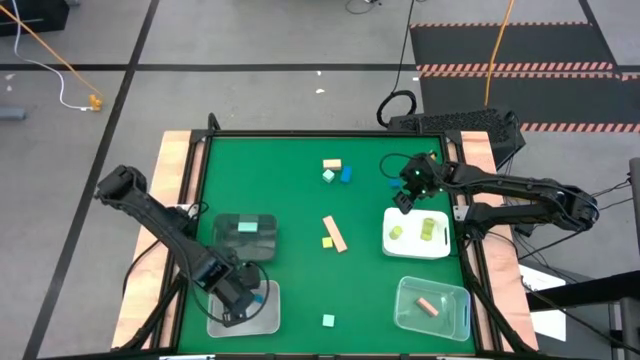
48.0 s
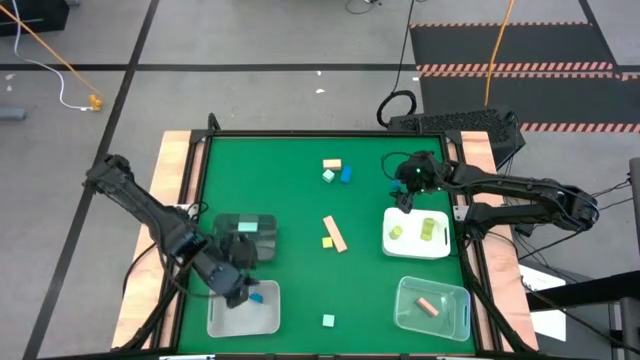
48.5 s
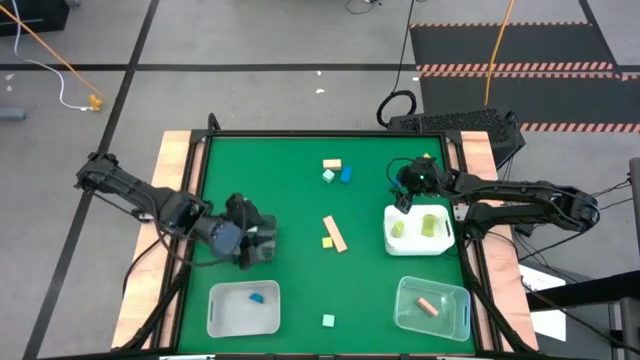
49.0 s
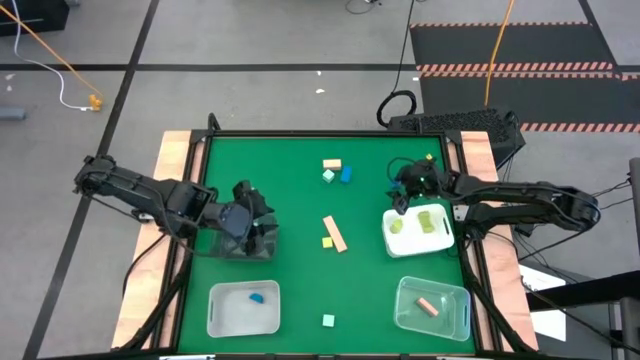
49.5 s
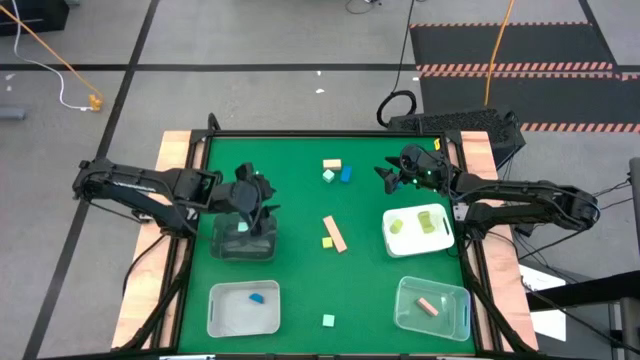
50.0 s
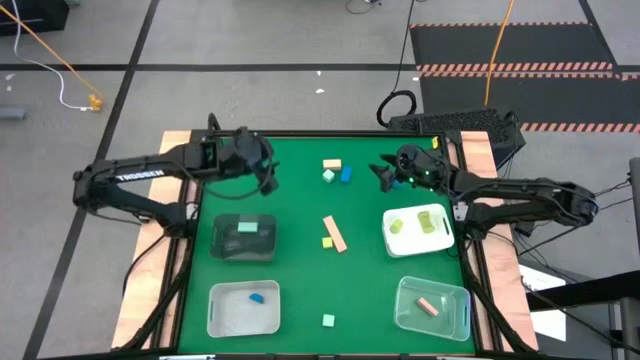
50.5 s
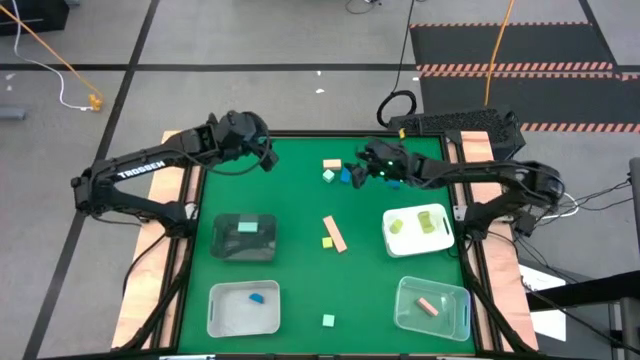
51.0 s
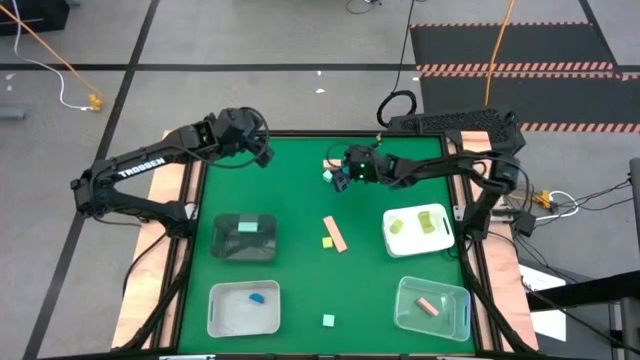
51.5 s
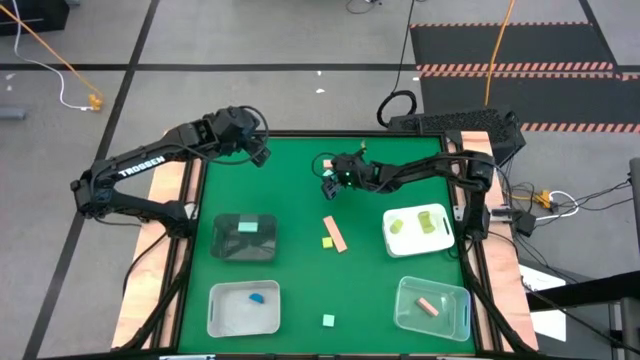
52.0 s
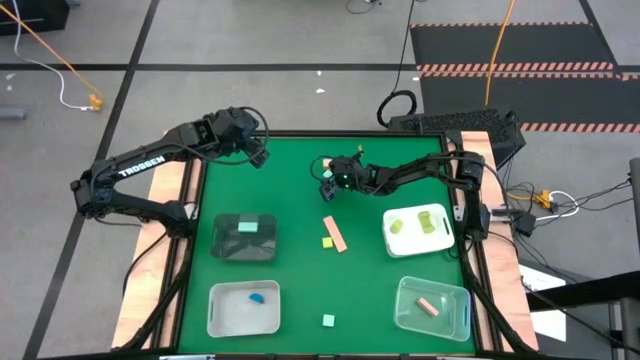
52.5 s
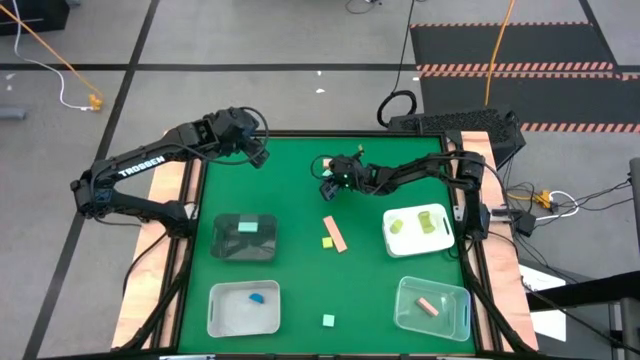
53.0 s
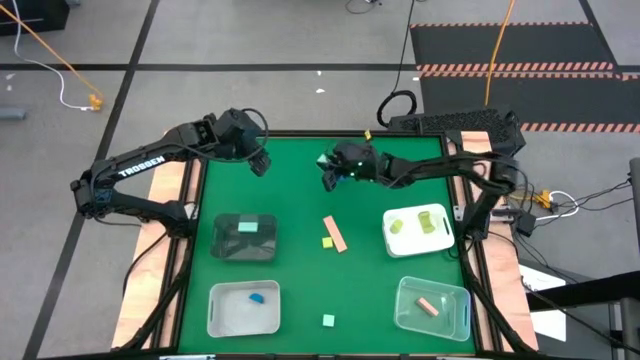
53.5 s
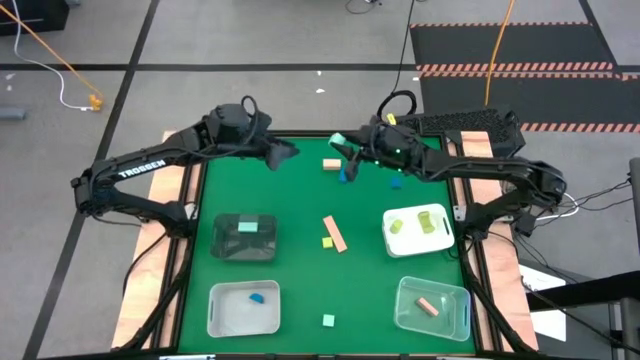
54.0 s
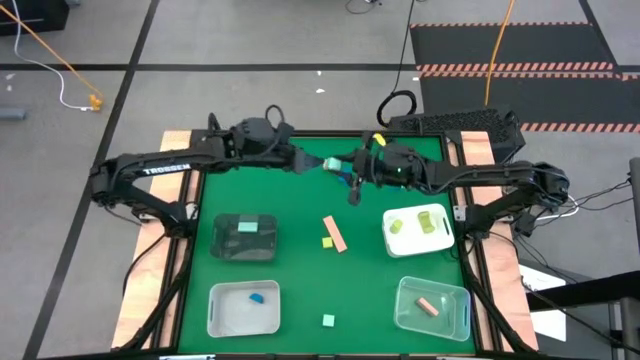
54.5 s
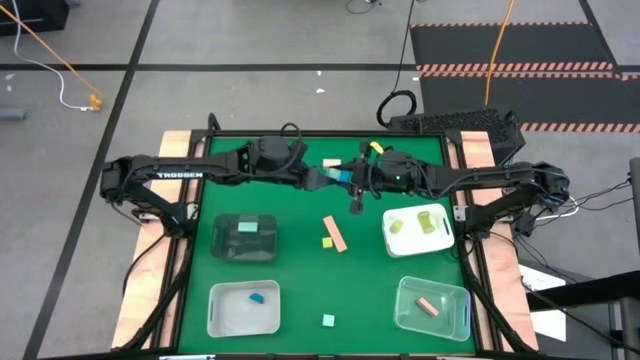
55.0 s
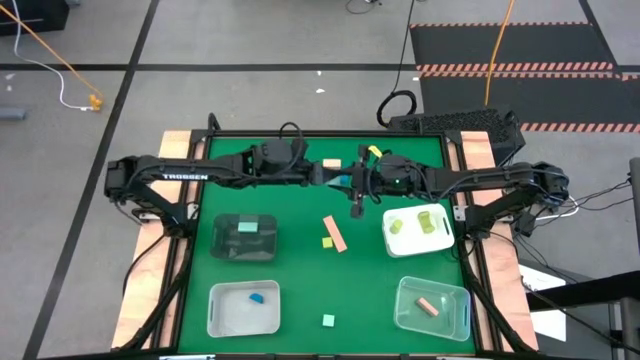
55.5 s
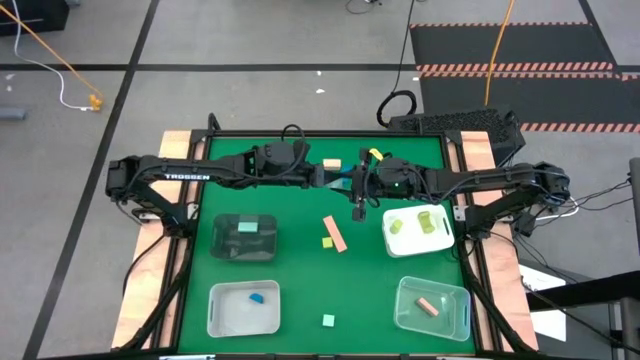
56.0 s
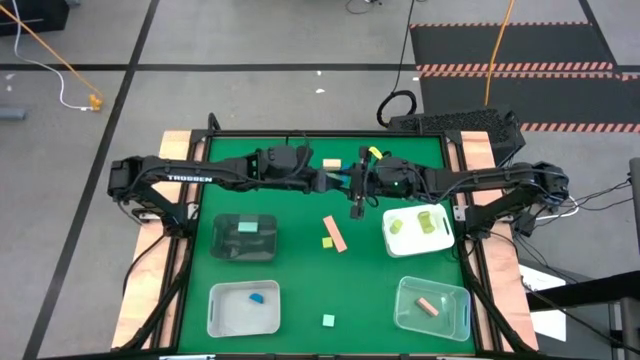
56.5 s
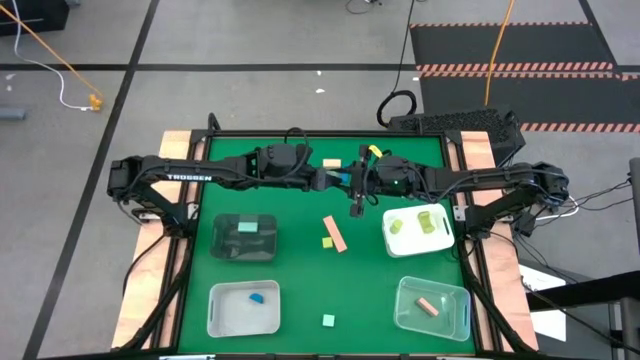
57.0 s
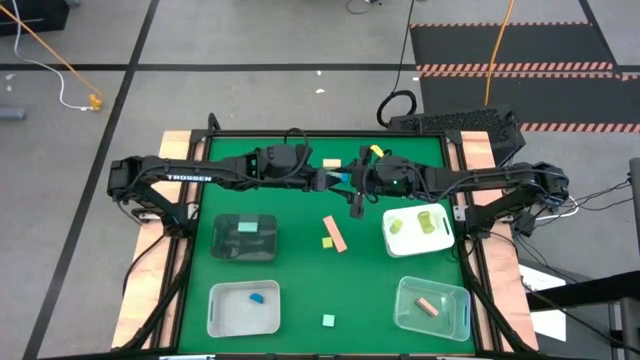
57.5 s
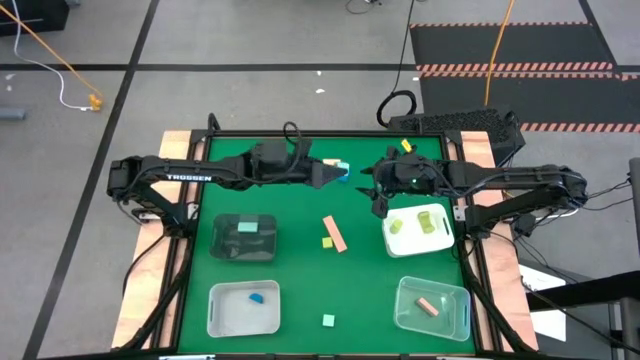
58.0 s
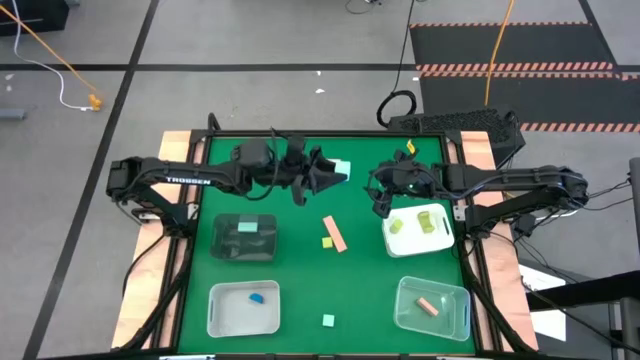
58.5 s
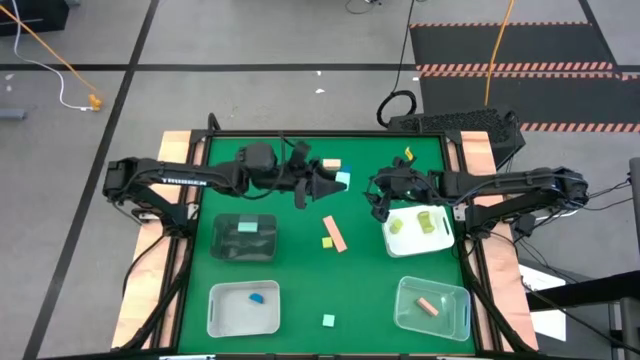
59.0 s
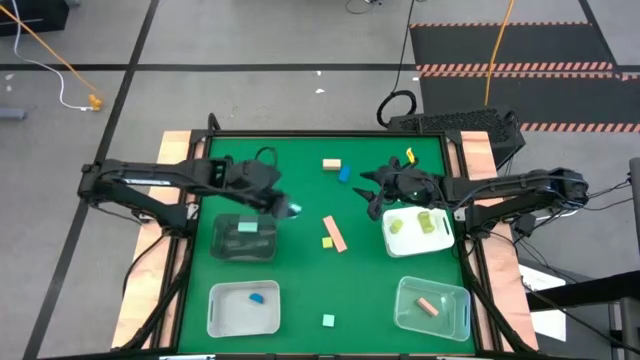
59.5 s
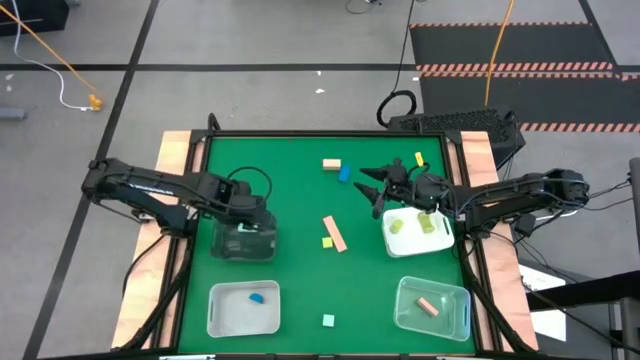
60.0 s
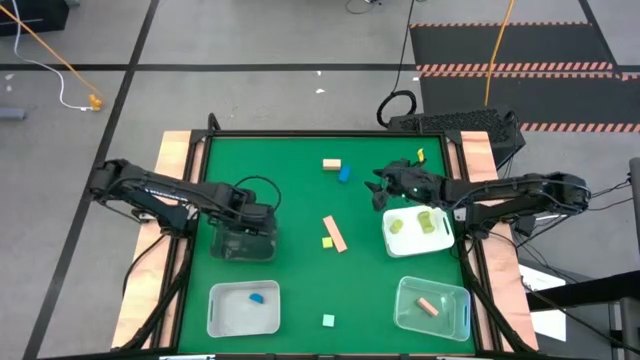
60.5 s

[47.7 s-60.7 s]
Task: Sort & place blocks by color
Put the top light blue block into the black bin

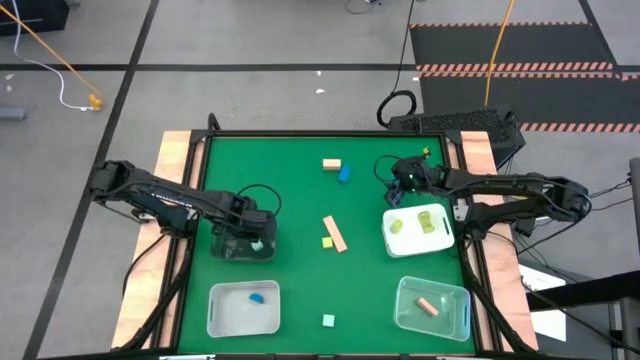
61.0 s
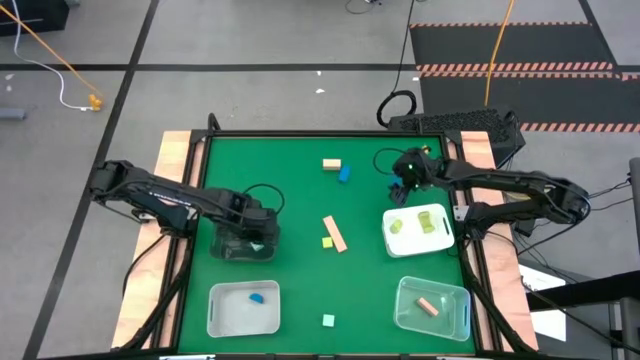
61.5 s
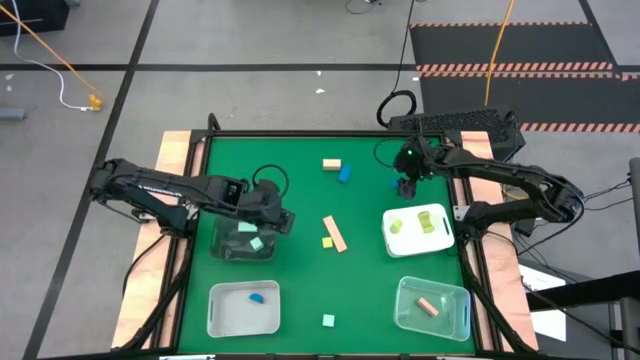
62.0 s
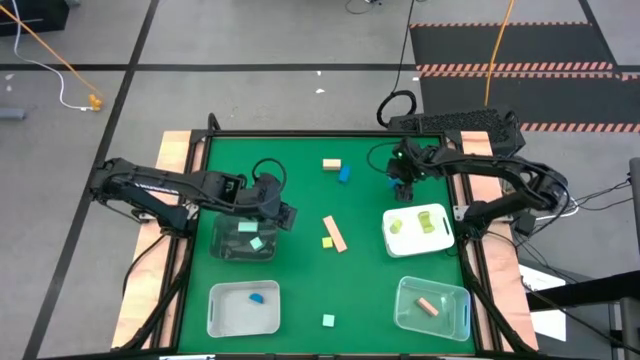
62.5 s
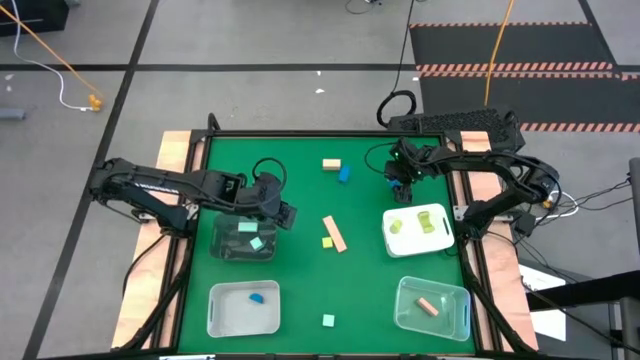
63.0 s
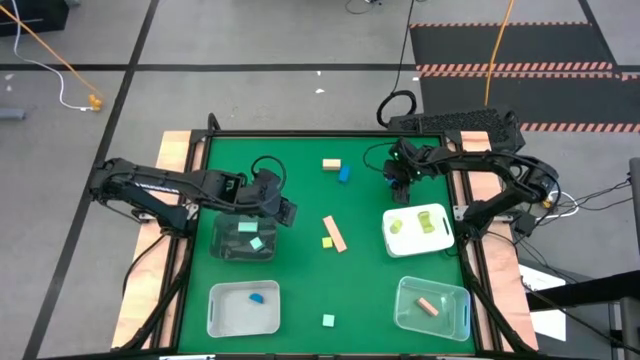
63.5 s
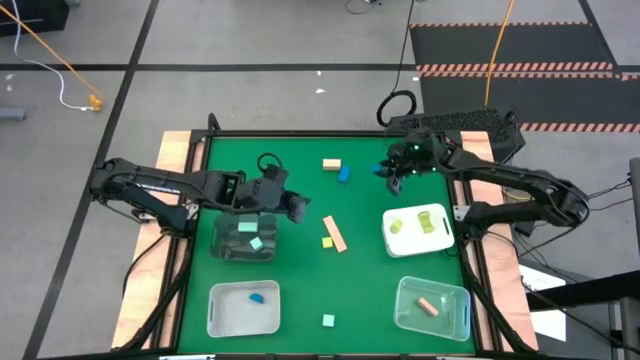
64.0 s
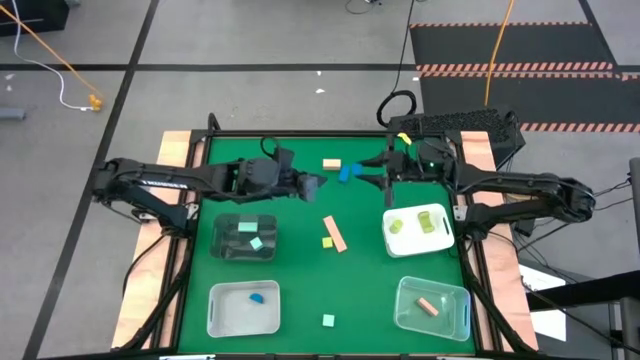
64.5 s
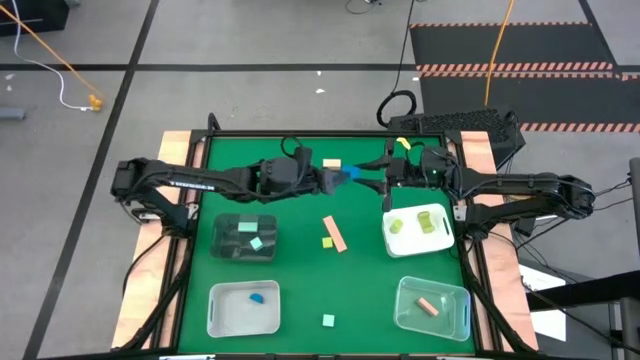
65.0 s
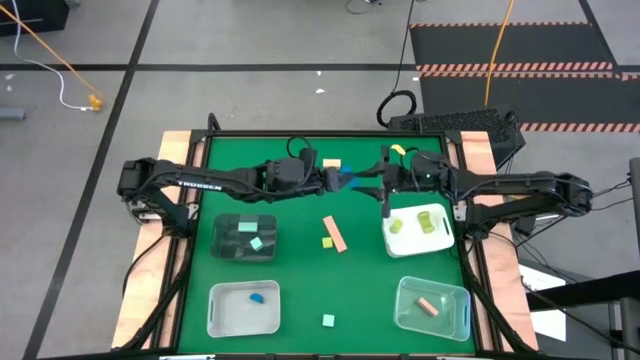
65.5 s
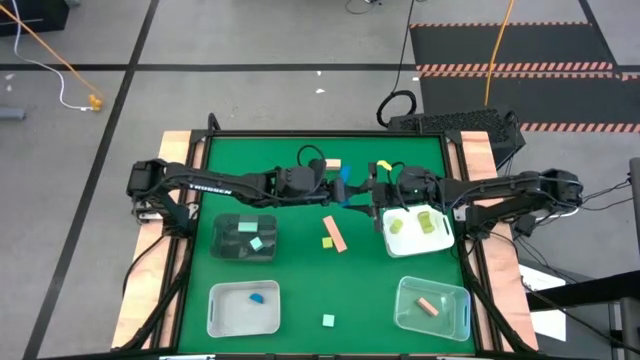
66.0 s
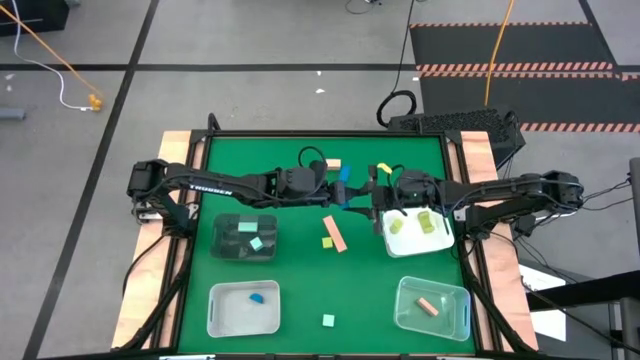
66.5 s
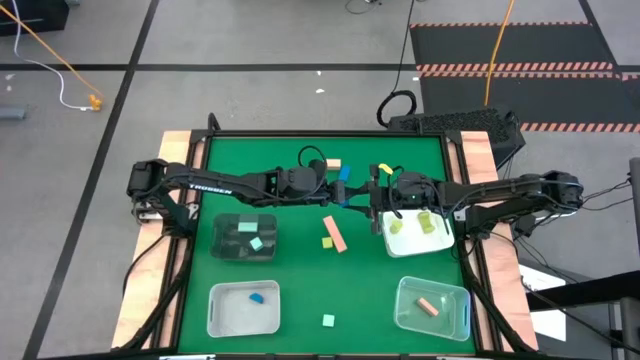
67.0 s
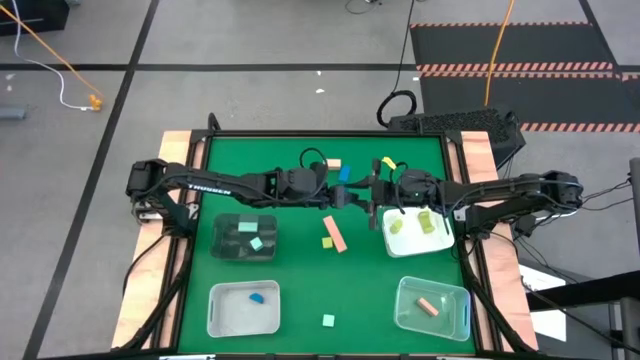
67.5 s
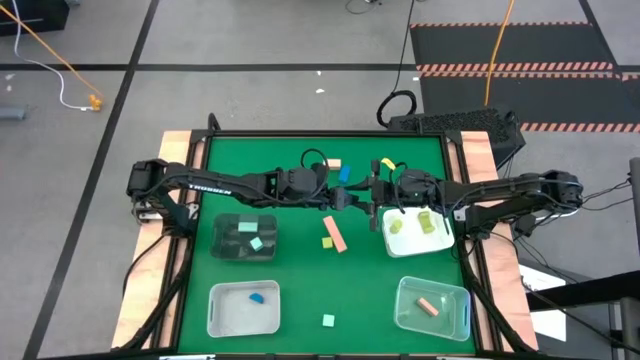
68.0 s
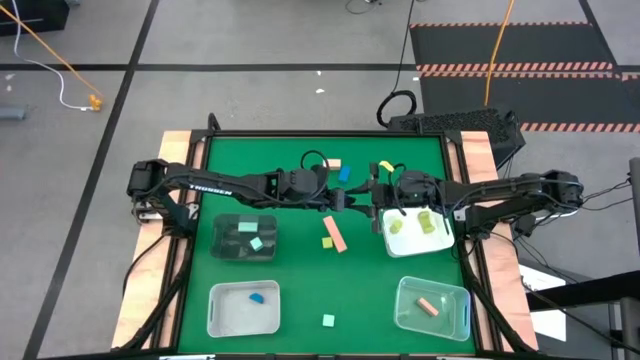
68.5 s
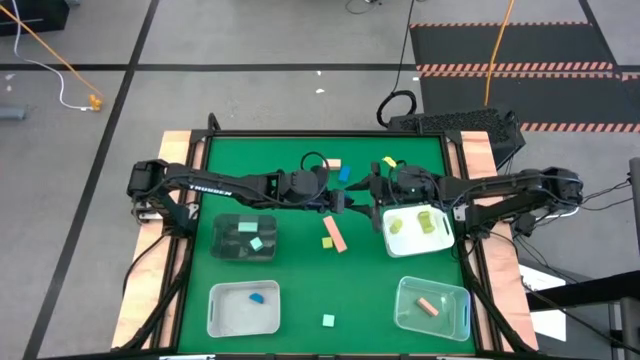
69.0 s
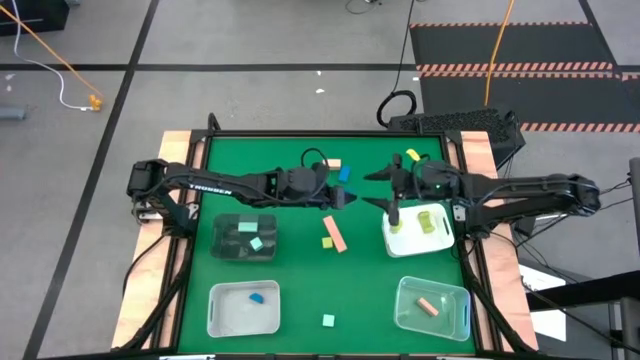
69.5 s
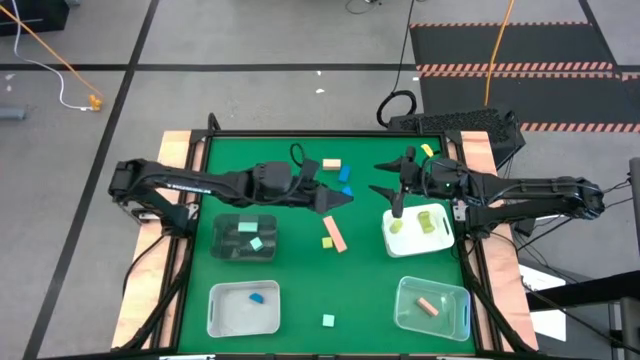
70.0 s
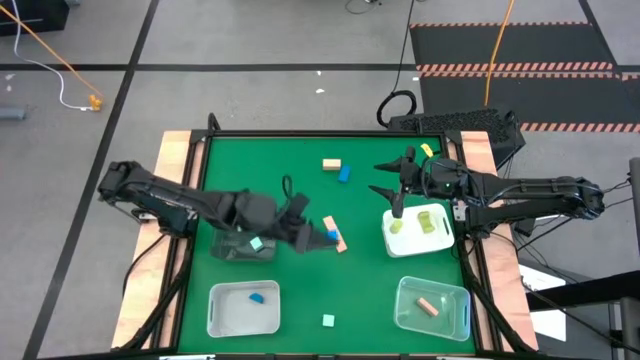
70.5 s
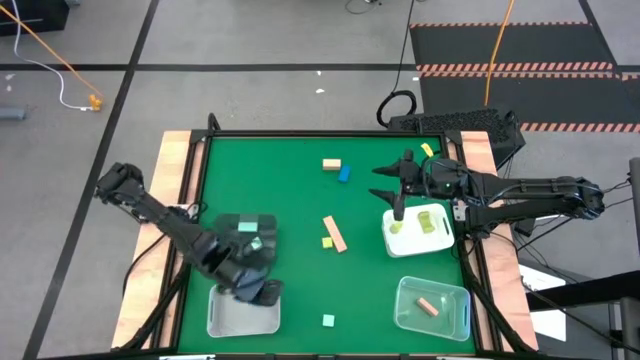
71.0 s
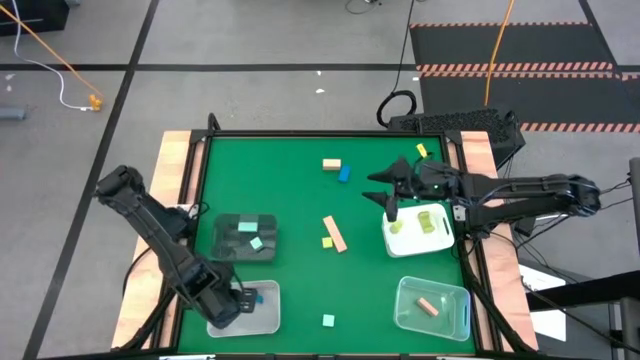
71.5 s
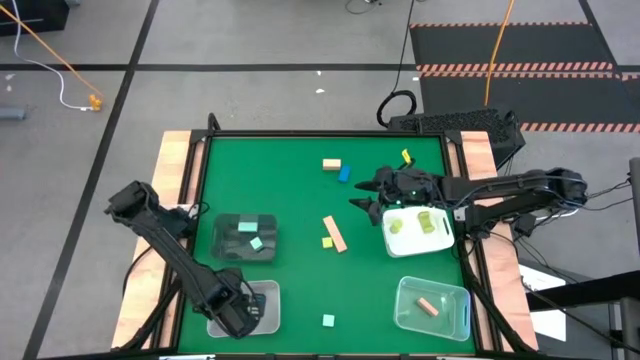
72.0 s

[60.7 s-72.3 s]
Put the right blue block into the gray bin
